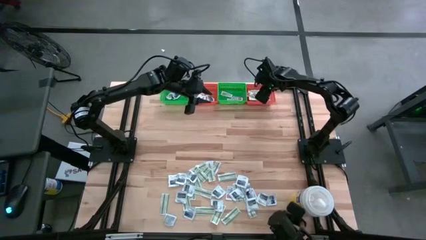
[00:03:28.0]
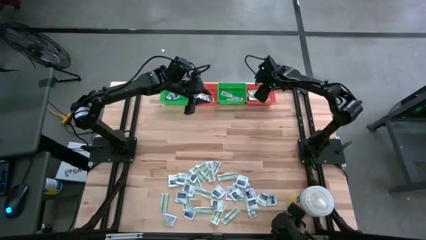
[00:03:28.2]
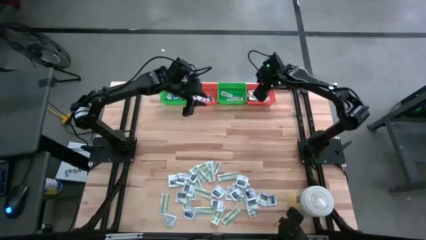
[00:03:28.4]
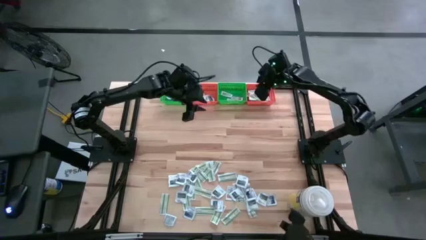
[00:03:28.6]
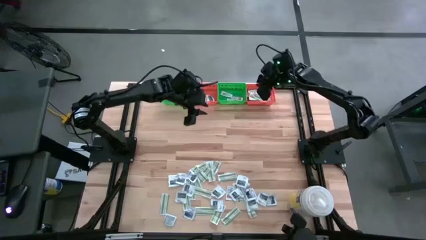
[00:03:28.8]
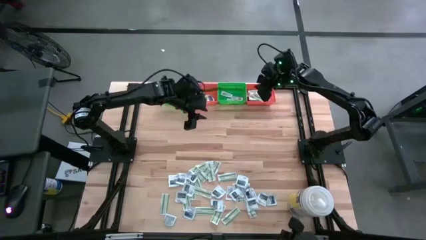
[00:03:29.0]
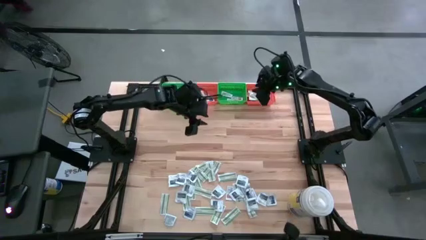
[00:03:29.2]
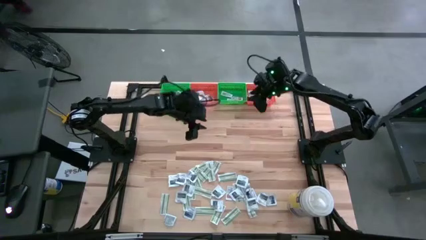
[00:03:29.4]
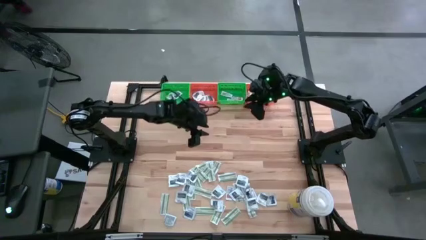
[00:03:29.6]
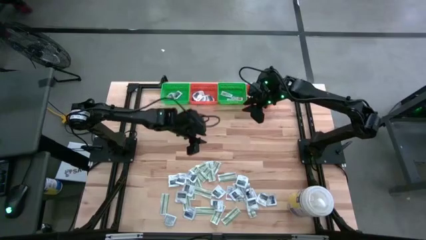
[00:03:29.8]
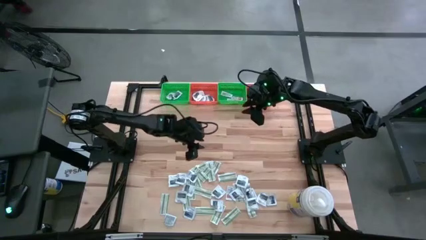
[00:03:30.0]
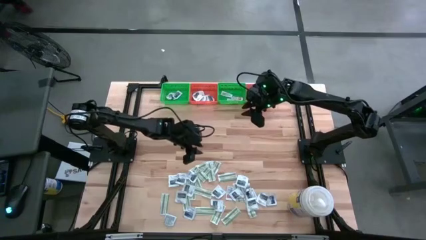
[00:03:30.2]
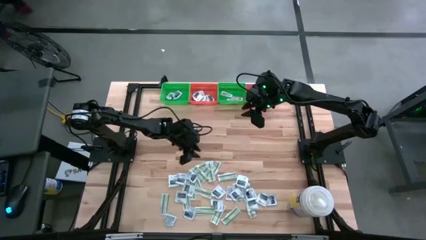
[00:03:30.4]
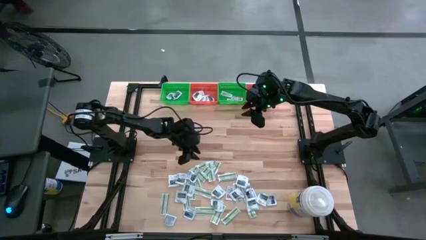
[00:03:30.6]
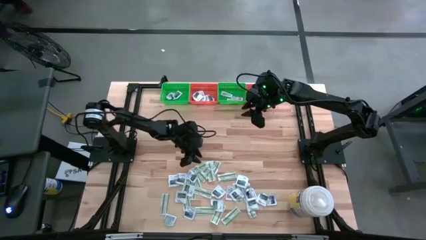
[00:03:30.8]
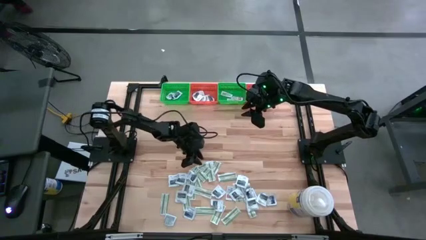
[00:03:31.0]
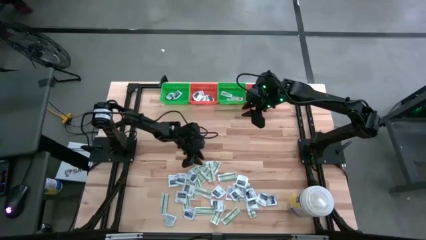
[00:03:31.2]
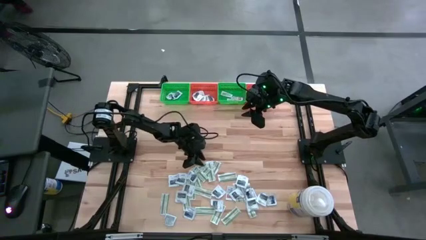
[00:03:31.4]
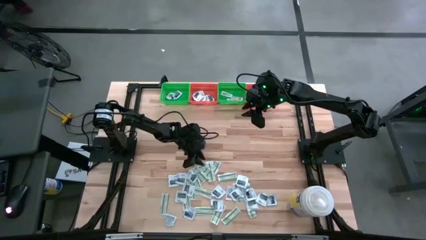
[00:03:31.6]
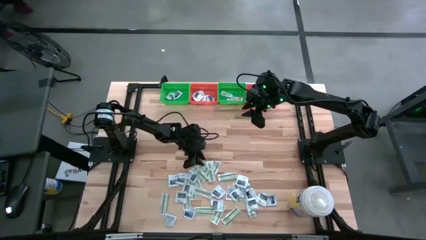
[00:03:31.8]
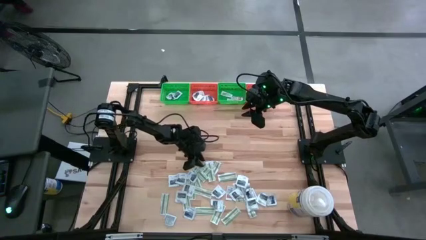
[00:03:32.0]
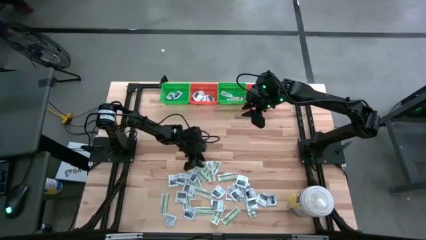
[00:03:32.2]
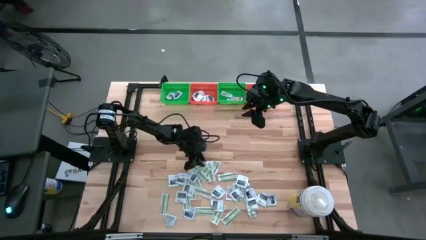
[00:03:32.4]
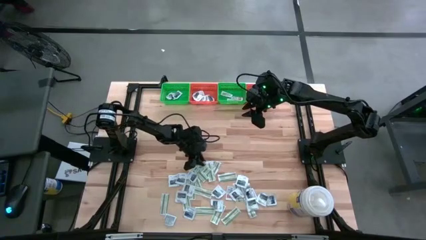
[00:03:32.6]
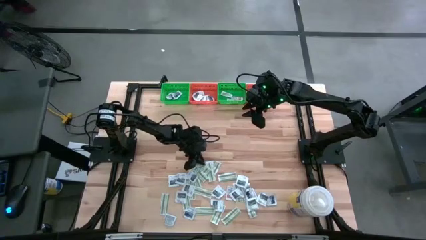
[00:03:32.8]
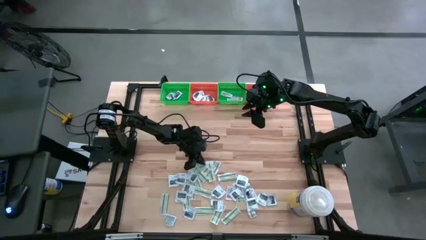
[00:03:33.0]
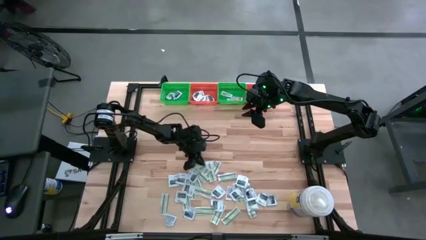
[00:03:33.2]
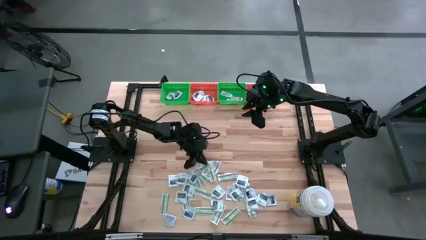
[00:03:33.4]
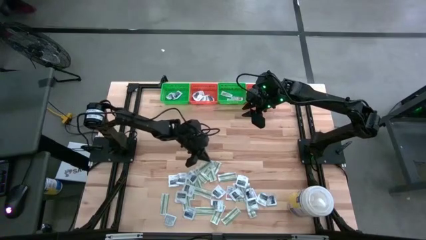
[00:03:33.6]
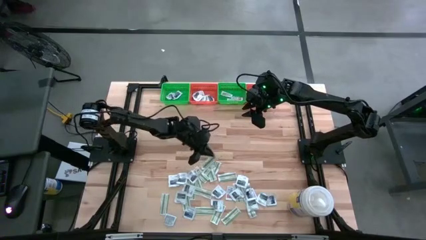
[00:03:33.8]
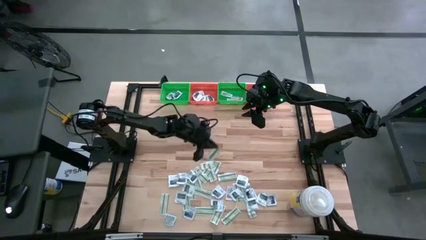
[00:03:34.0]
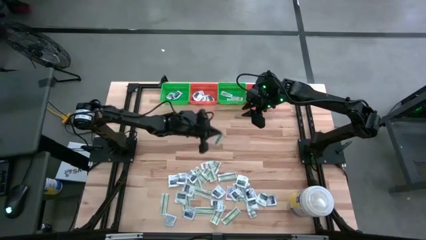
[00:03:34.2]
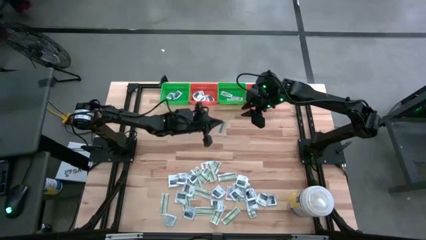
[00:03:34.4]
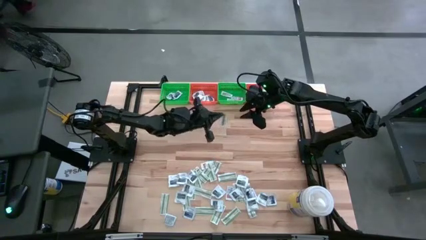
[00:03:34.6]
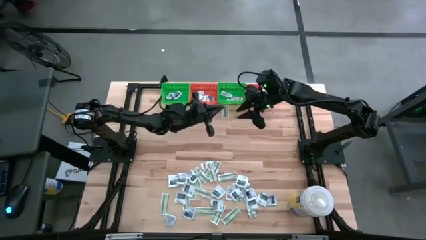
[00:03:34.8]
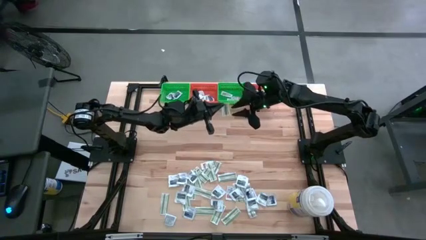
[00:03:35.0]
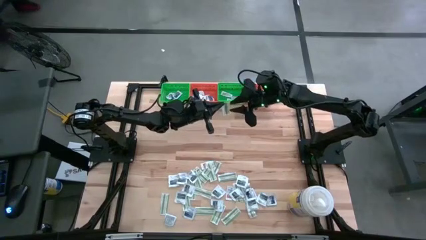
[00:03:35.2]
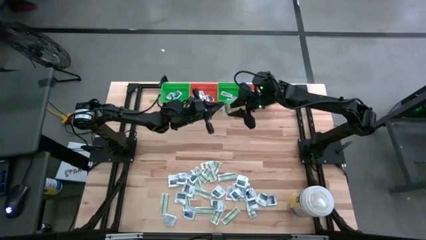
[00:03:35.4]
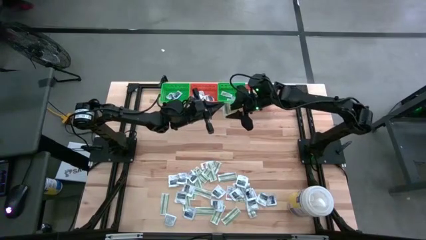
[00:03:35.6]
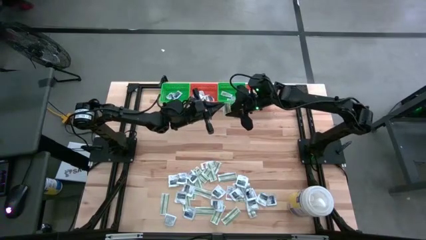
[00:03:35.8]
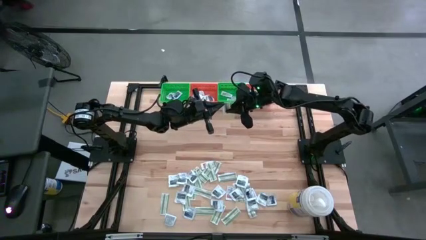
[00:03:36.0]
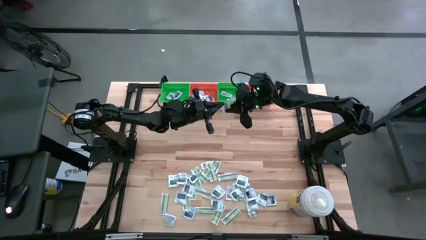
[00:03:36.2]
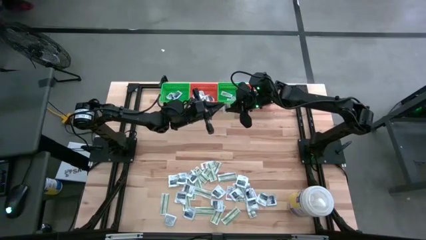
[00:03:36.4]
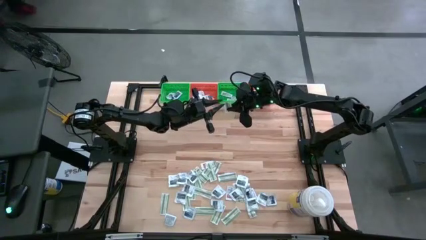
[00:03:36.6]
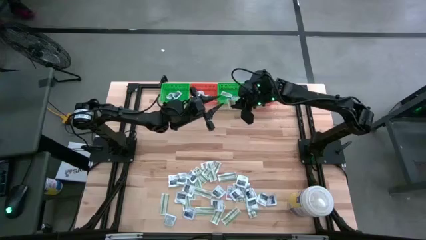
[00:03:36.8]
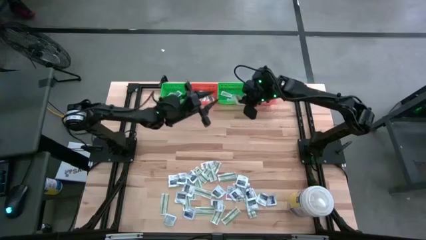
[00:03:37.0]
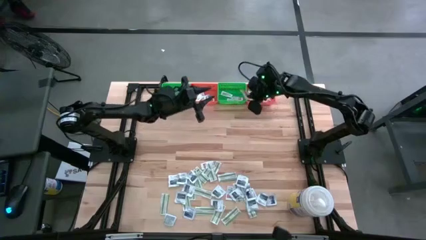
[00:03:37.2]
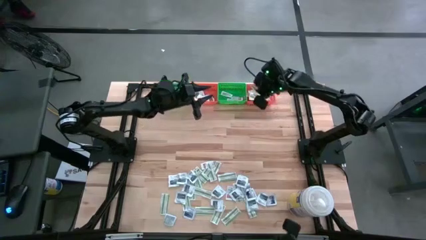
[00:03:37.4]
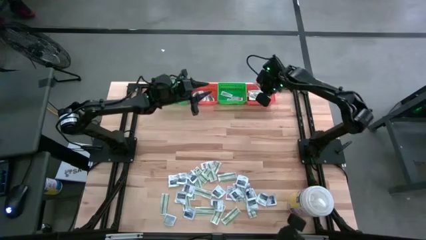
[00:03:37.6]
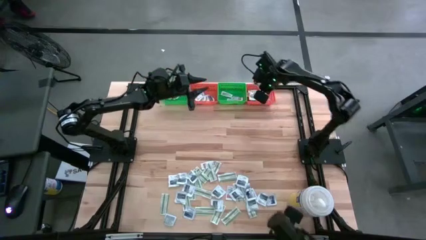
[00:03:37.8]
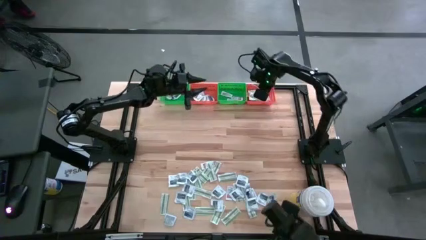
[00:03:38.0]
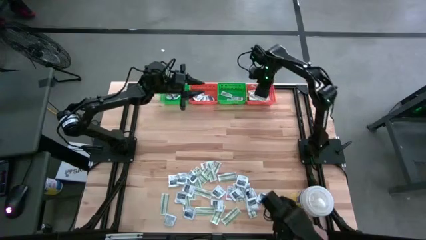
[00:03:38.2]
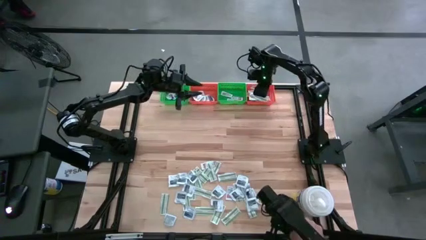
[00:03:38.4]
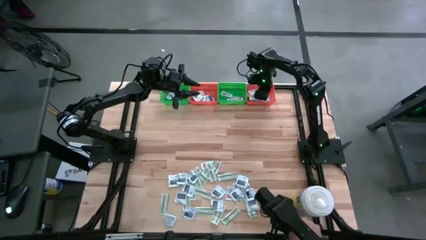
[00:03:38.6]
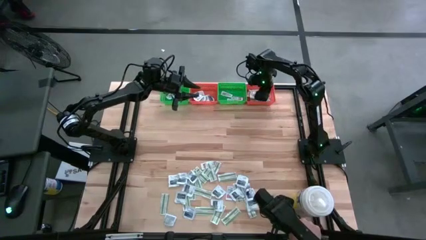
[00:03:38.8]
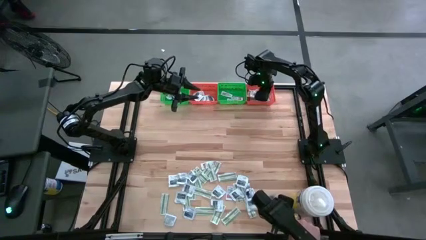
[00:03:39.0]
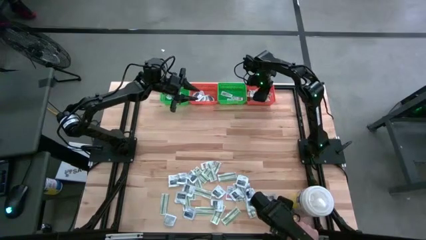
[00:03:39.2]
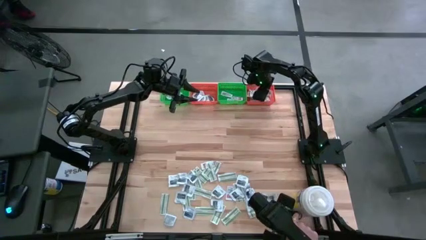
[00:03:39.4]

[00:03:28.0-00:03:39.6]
Task: Pick & Place First Aid Supplies
Put the green bandage pack in the right orange bin

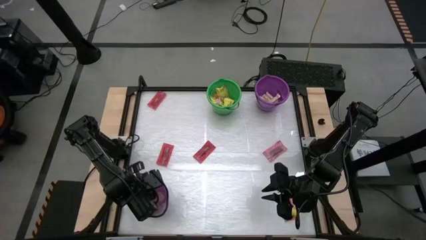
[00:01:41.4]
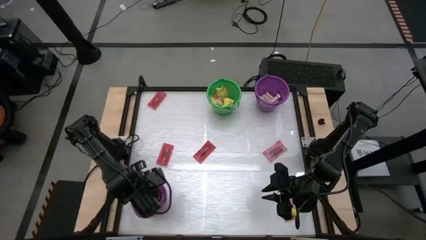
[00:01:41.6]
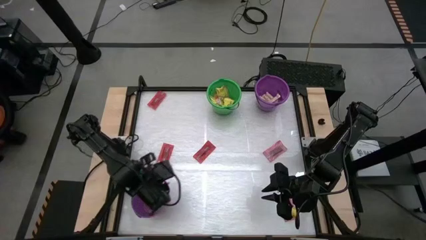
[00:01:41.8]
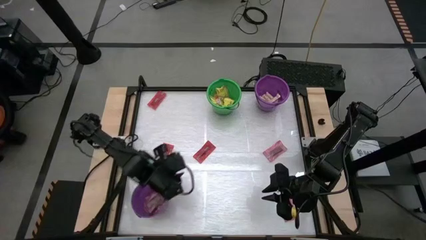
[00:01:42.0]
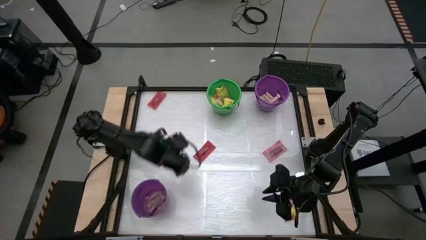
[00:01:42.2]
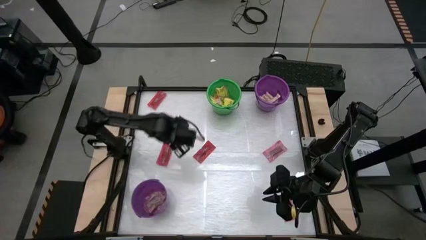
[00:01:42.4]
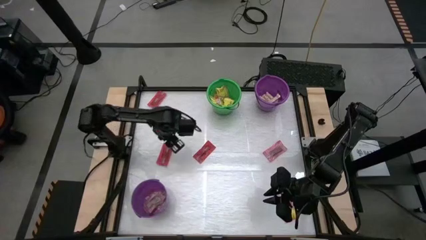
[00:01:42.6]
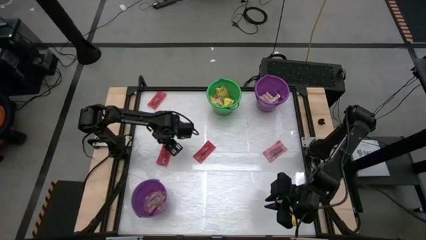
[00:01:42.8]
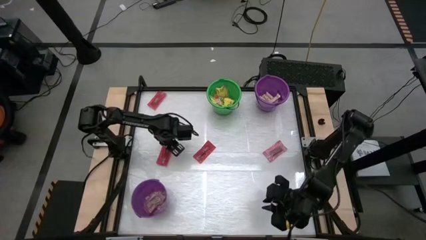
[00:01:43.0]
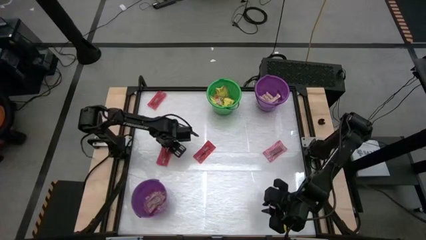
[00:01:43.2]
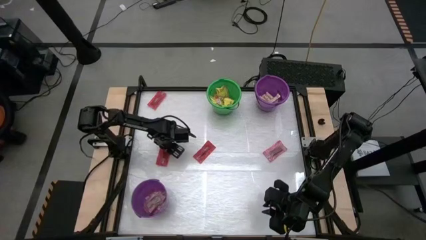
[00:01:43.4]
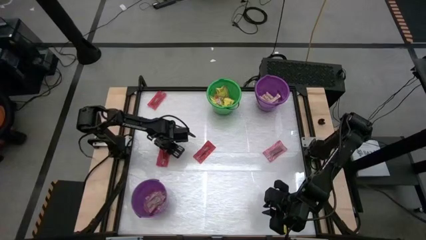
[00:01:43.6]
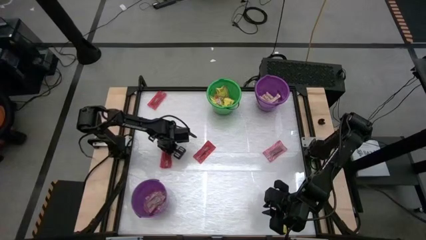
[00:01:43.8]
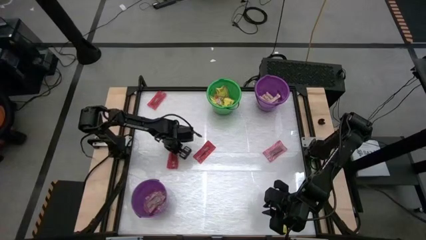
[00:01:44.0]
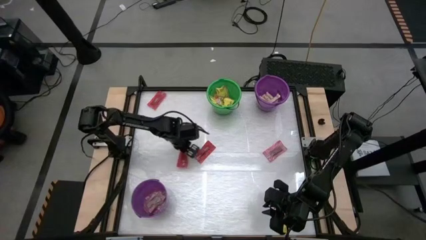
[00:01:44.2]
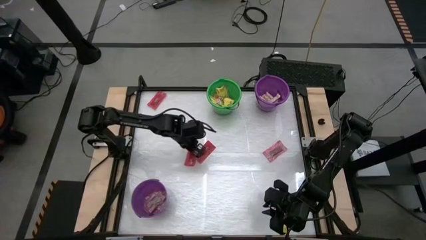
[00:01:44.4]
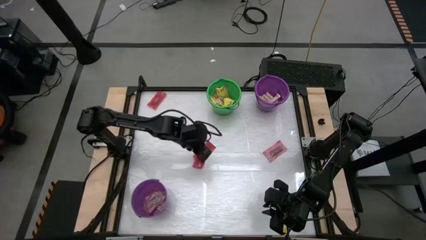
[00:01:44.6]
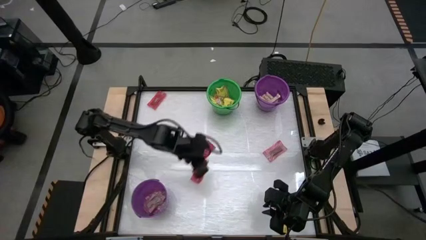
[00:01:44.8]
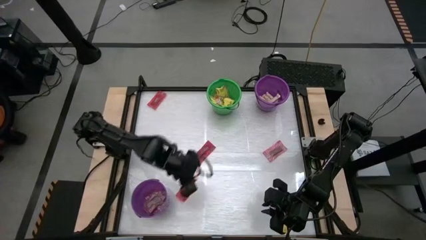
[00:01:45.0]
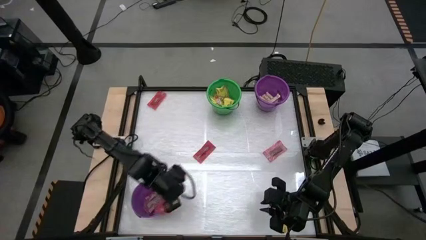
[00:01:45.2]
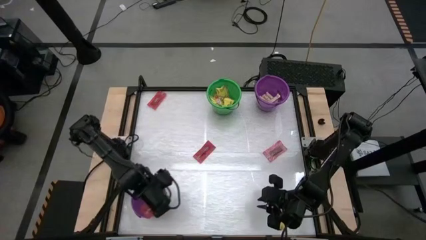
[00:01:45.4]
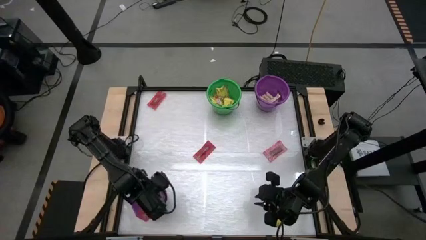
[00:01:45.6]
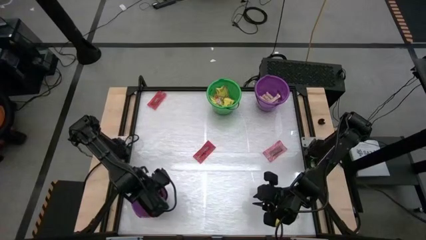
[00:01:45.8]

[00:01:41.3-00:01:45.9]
Task: Sort candy by brand, put in halloween buckets
Put the red candy into the bottom violet bucket
